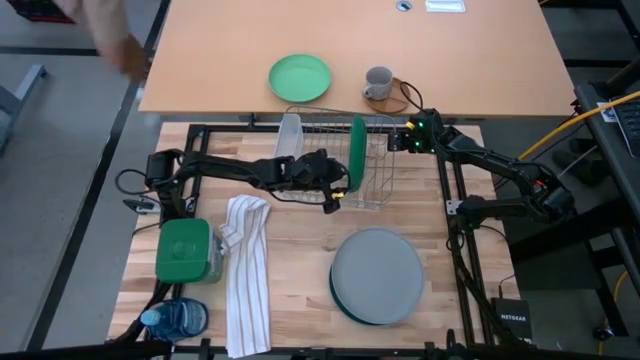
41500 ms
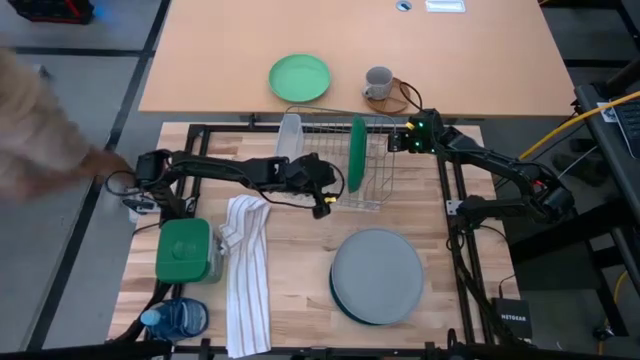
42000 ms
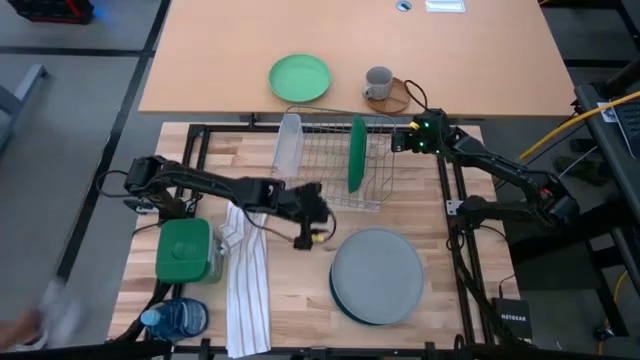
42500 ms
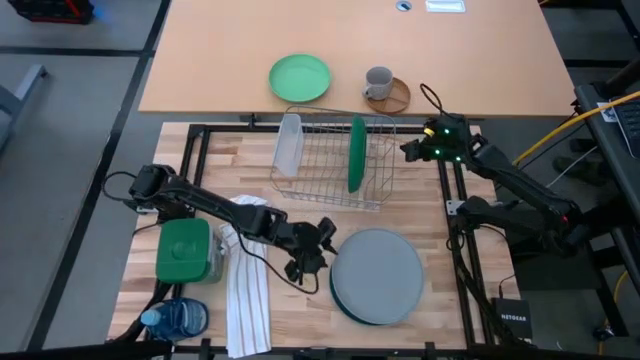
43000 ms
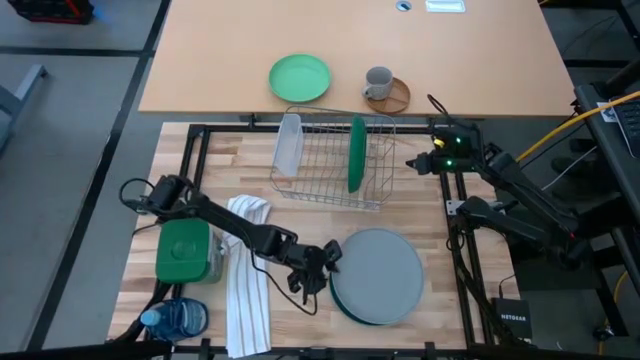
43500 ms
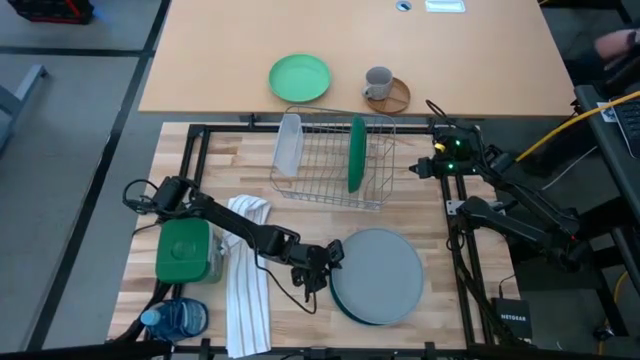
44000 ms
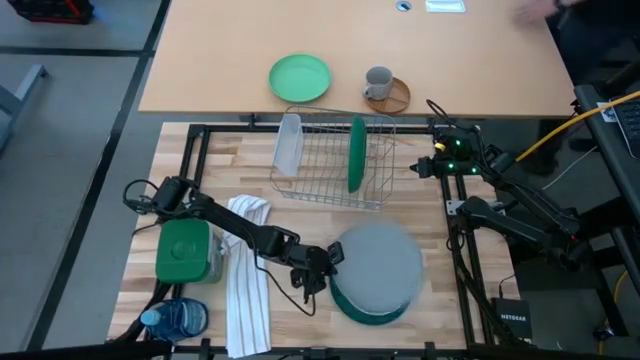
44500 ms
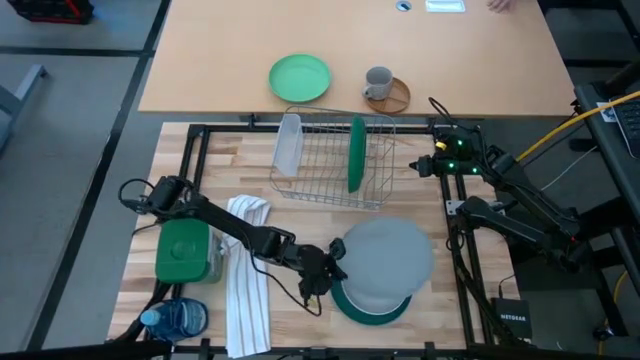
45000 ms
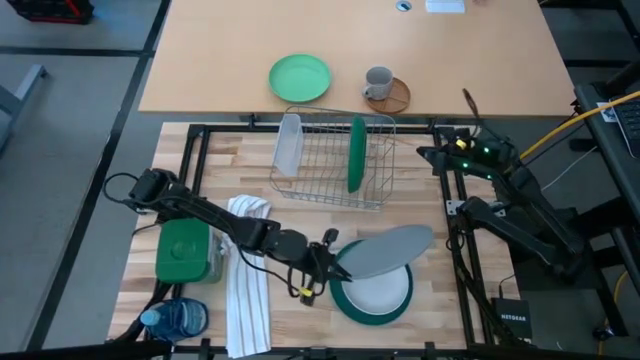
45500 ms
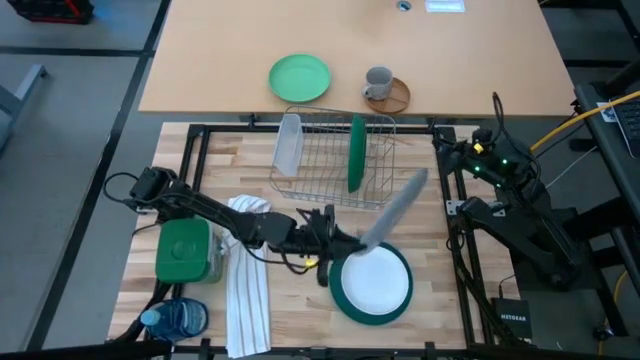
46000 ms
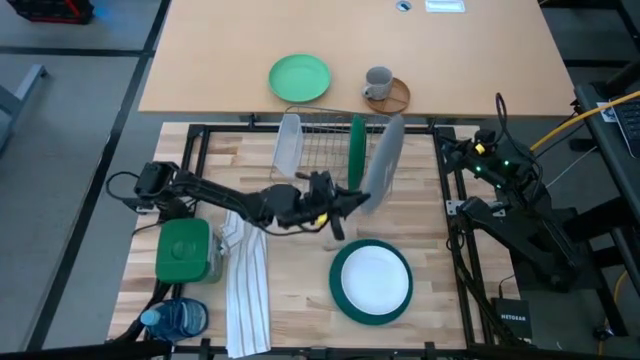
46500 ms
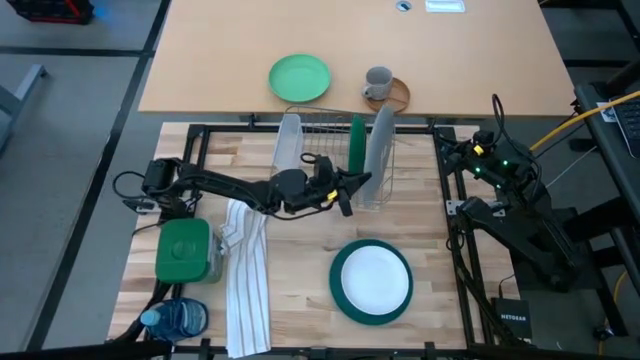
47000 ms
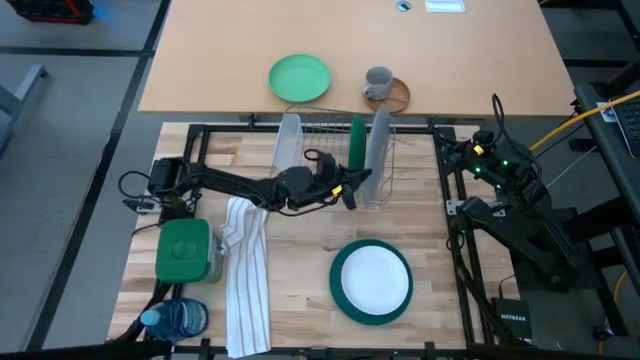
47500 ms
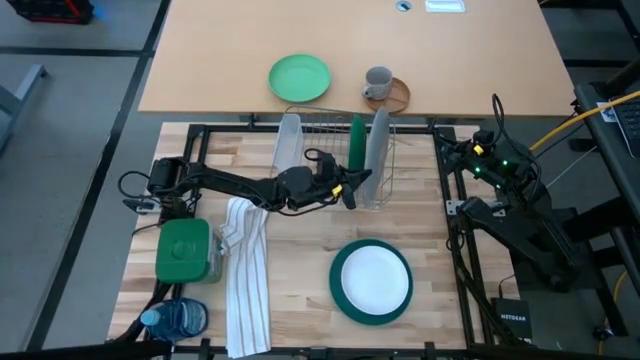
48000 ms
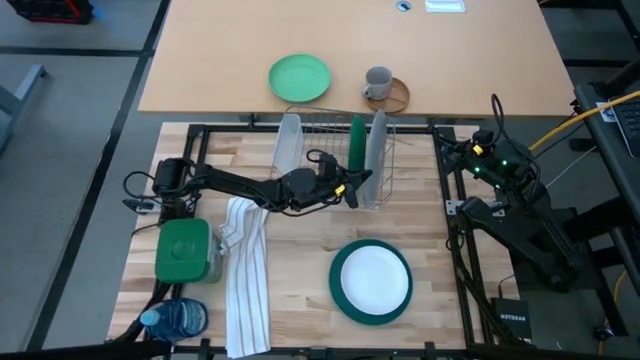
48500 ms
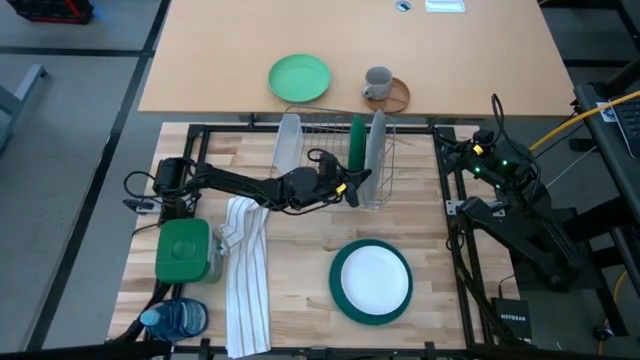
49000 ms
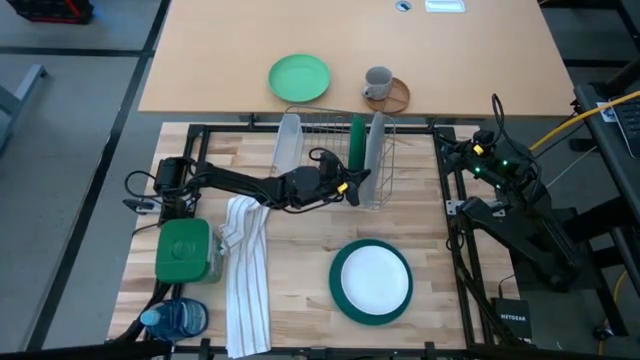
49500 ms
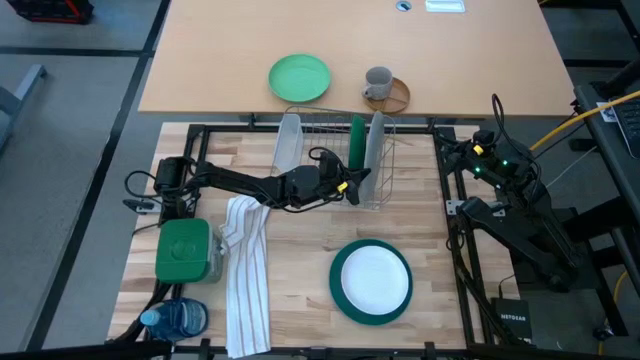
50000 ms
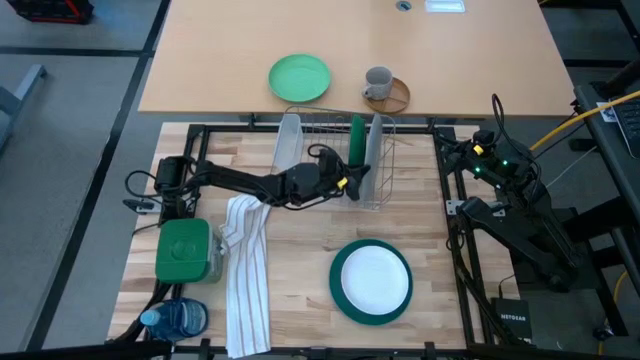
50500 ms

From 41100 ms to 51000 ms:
Task: Sort dishes
Put the gray plate in the dish rack

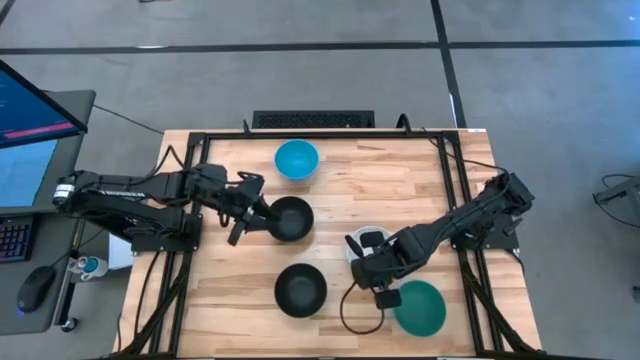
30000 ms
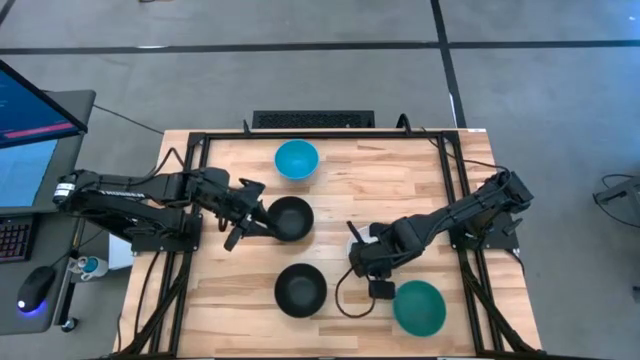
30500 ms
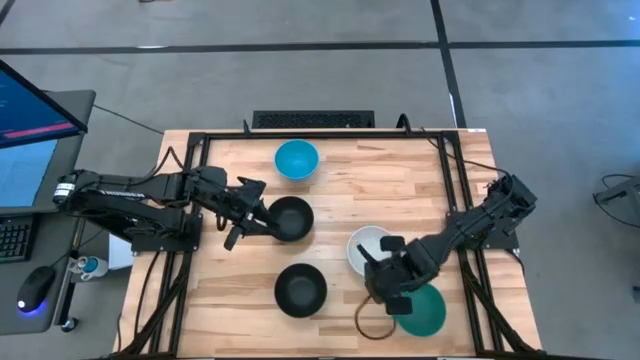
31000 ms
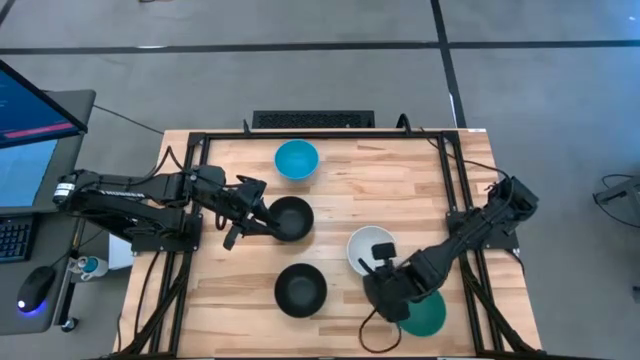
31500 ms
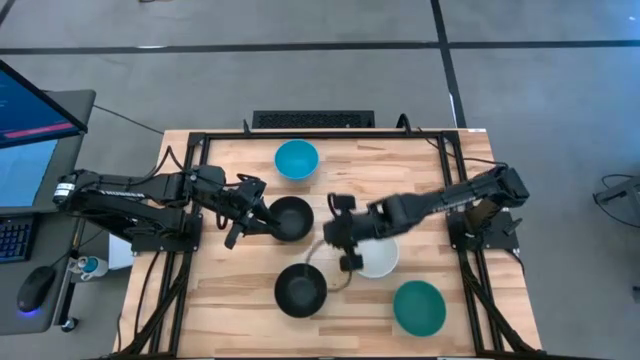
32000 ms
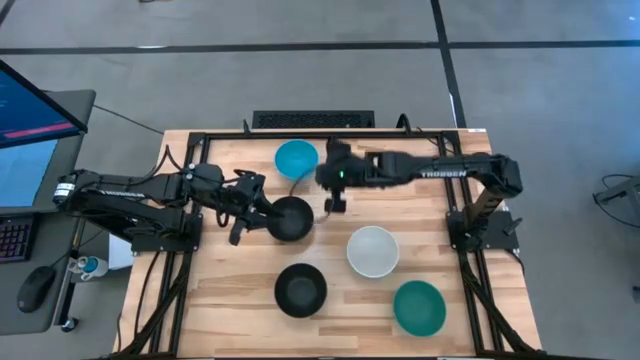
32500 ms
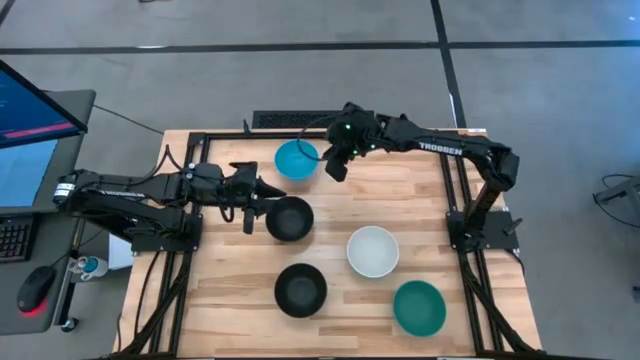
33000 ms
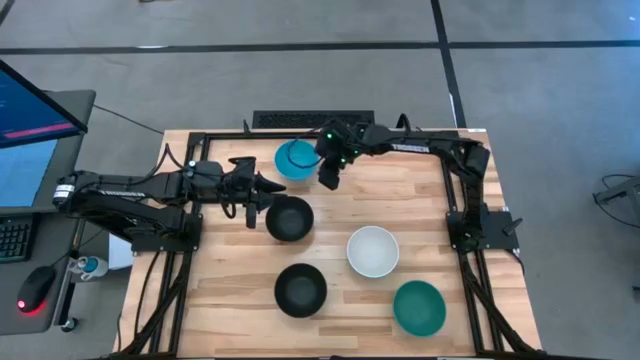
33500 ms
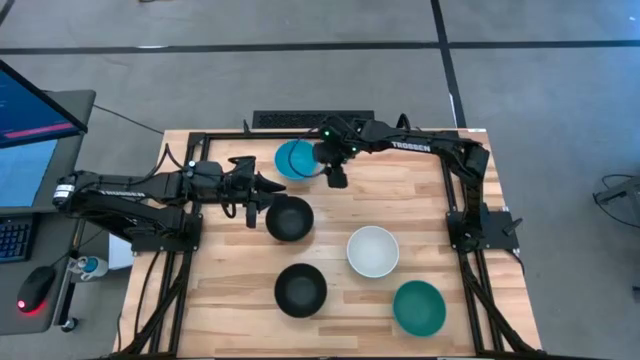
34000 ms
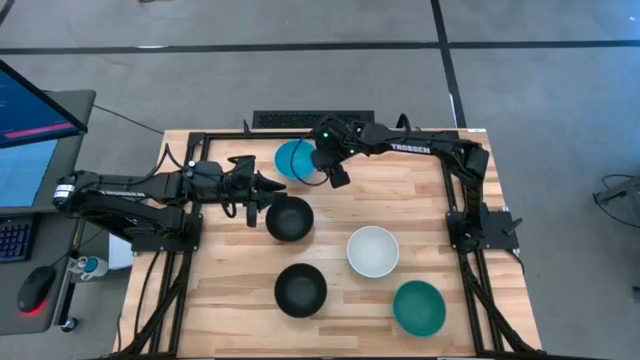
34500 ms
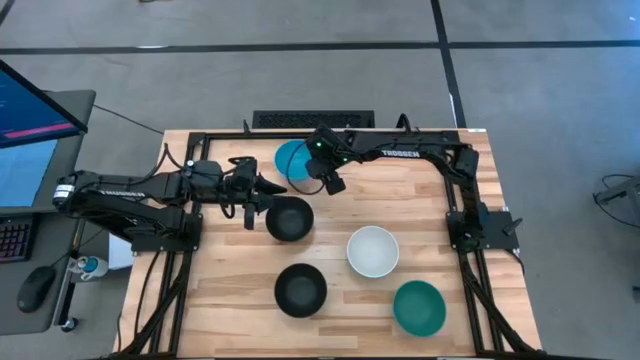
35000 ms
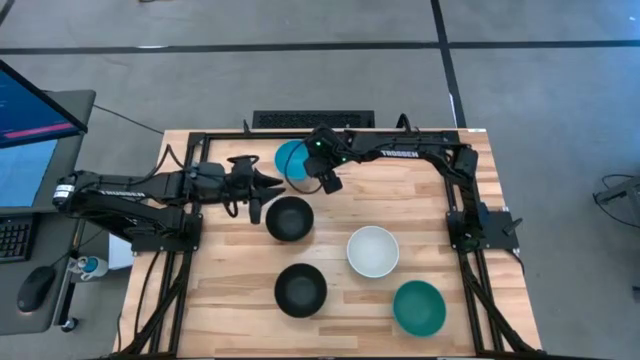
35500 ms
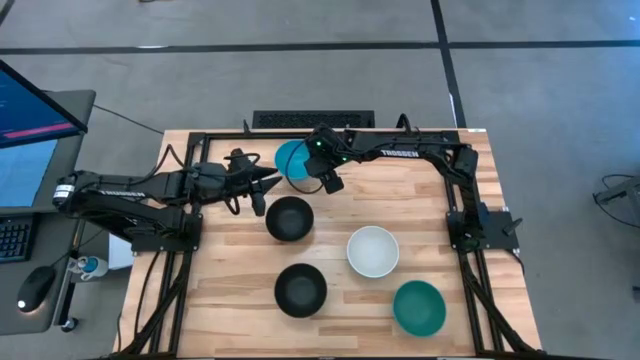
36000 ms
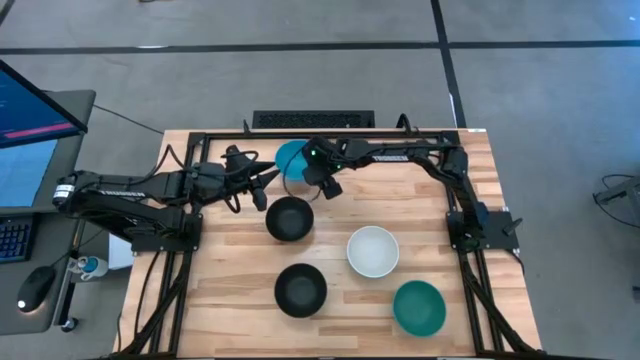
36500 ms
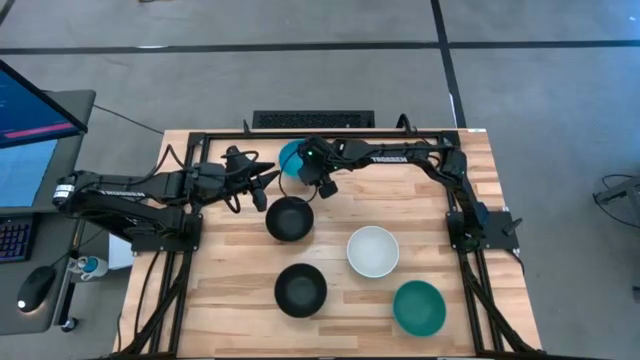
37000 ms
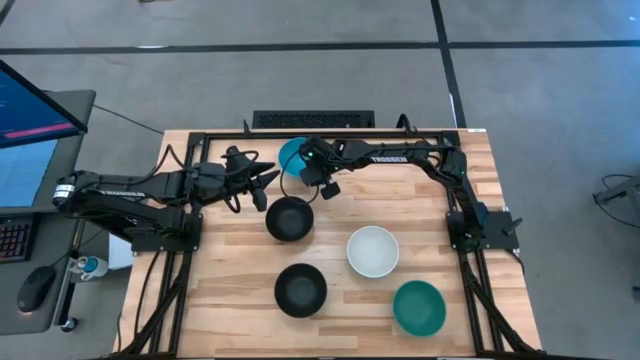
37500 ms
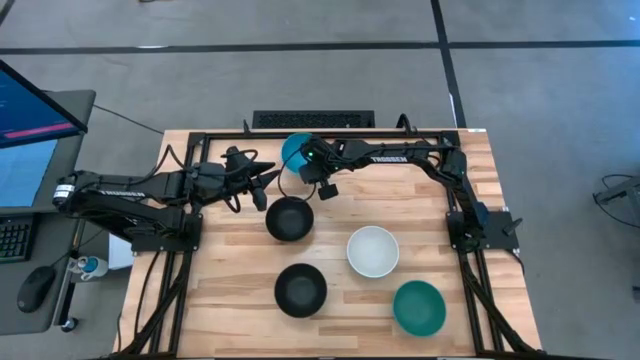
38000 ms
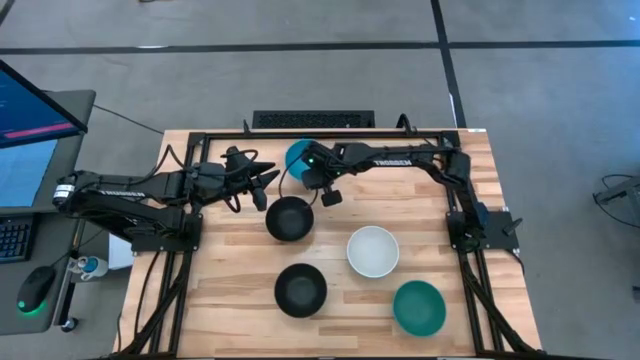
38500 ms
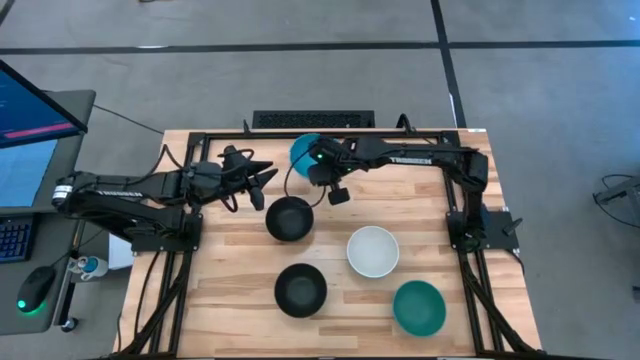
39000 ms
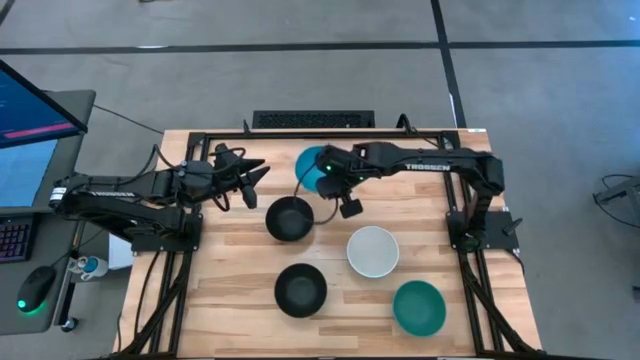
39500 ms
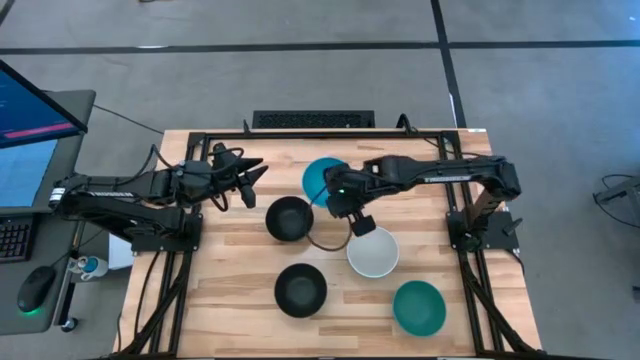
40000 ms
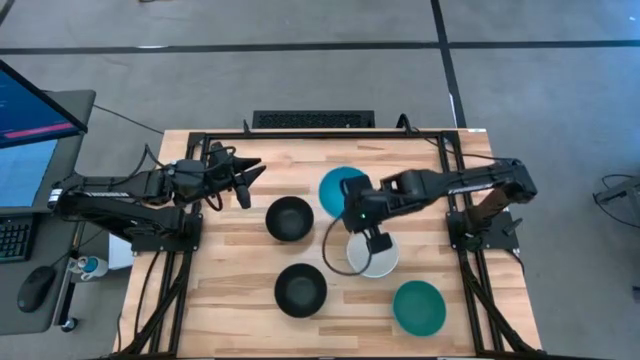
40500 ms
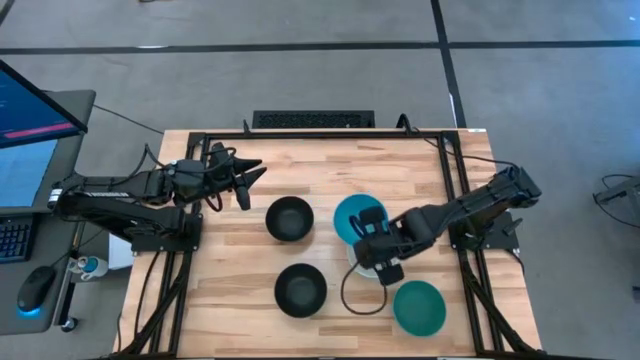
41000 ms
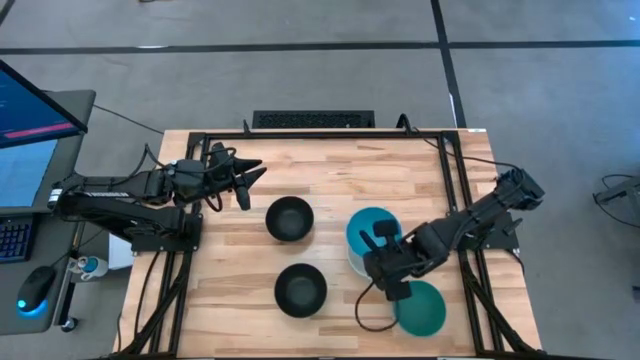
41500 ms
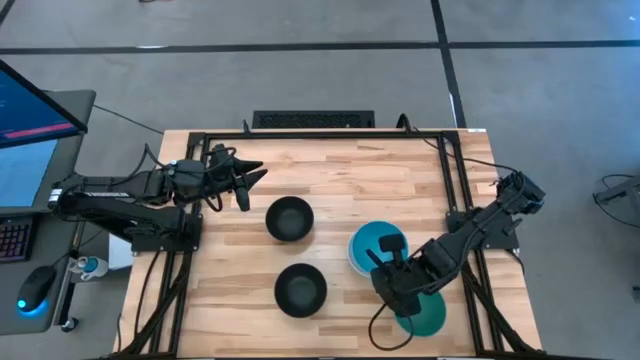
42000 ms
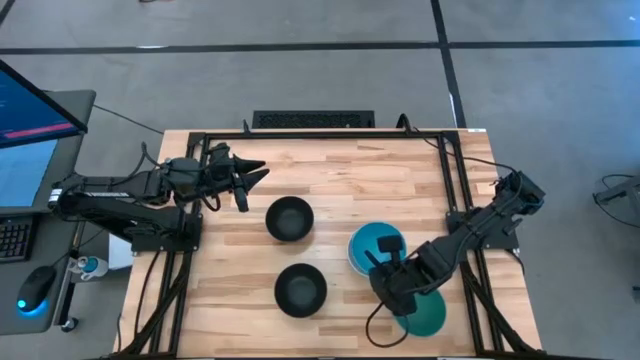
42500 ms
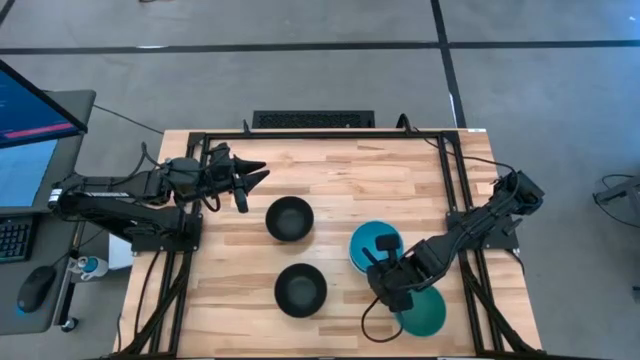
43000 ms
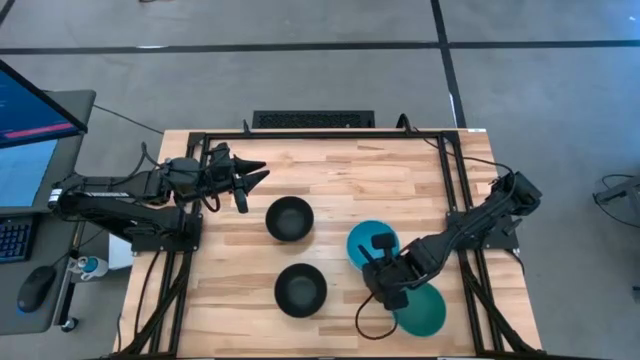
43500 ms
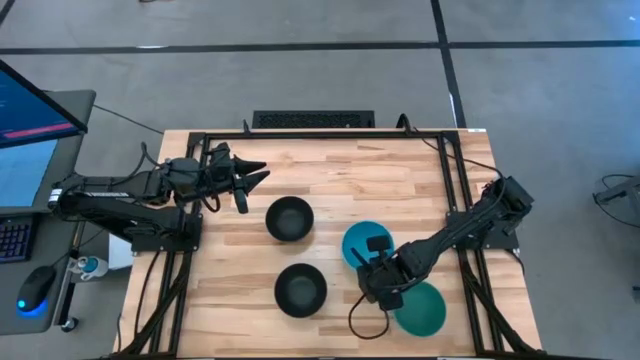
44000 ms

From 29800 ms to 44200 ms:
Task: Nest bowls inside each other
Stack the blue bowl on top of the white bowl
